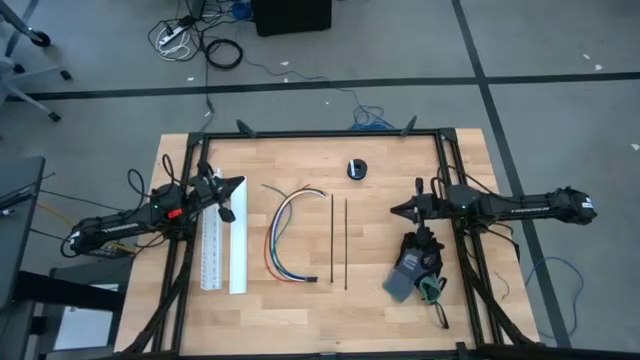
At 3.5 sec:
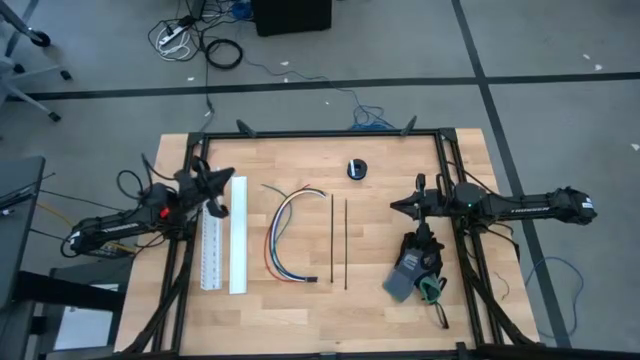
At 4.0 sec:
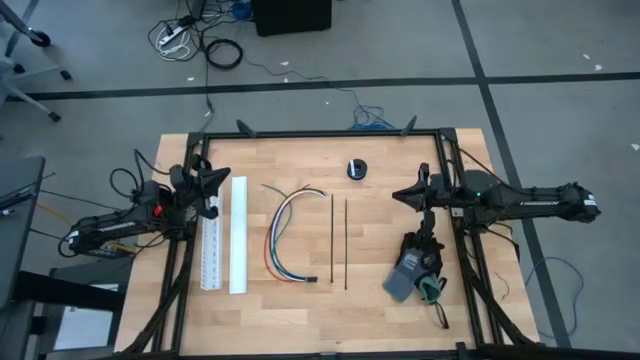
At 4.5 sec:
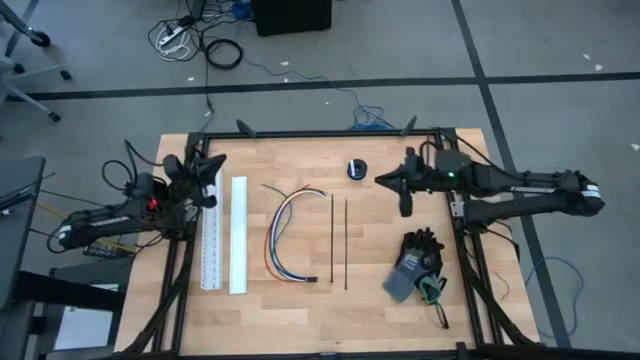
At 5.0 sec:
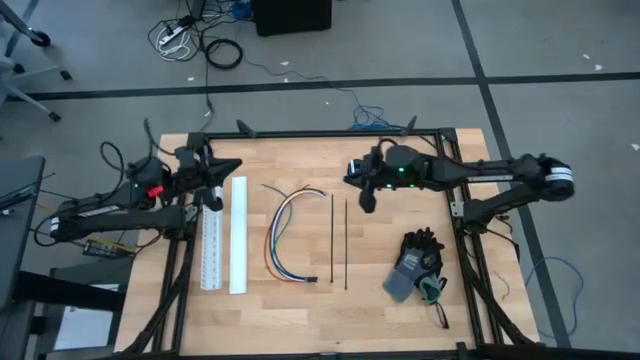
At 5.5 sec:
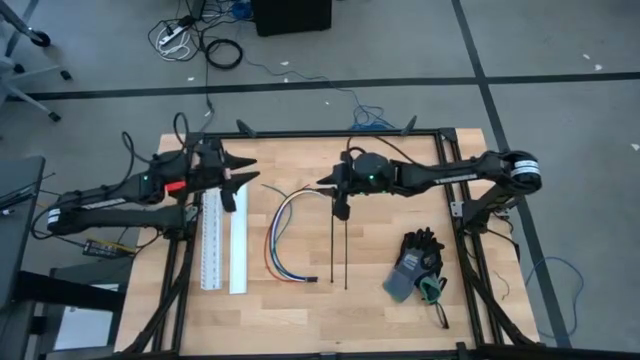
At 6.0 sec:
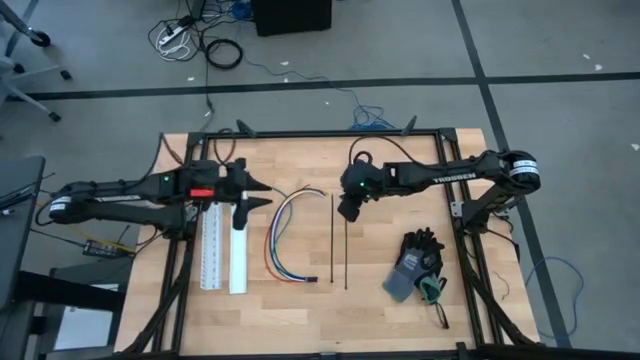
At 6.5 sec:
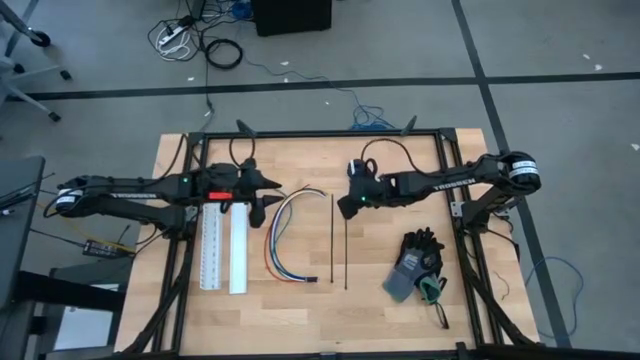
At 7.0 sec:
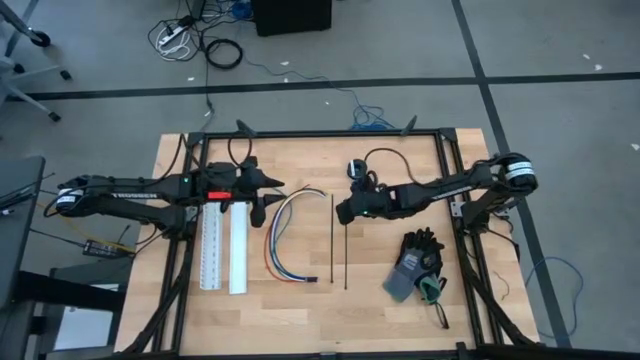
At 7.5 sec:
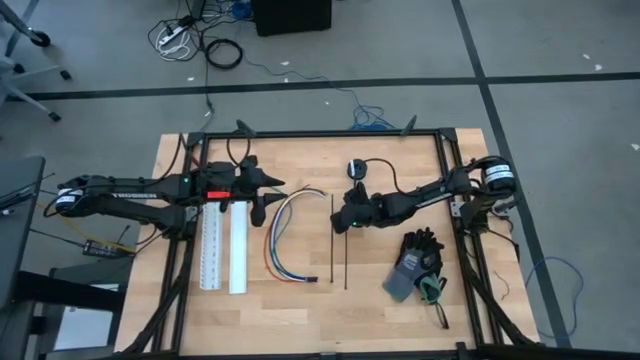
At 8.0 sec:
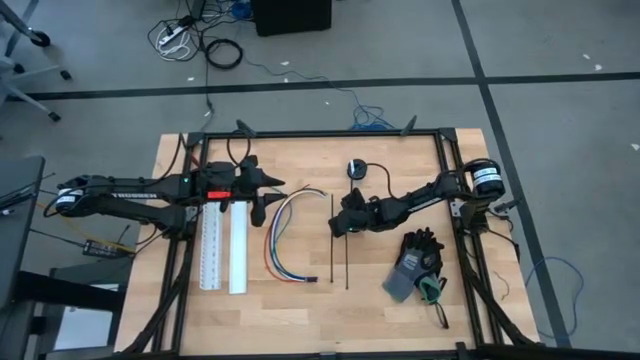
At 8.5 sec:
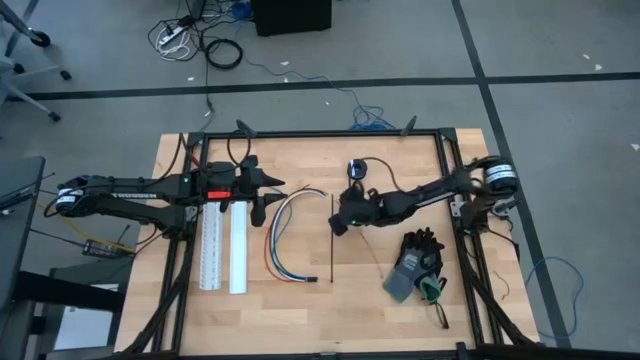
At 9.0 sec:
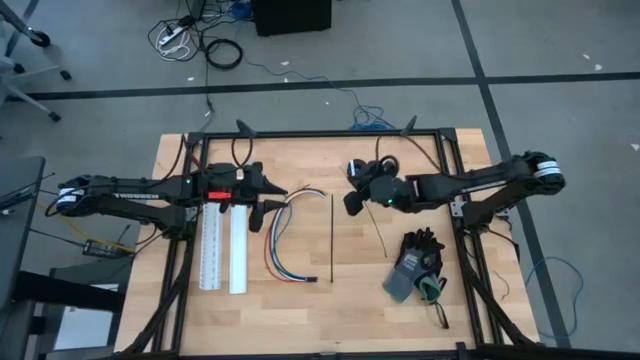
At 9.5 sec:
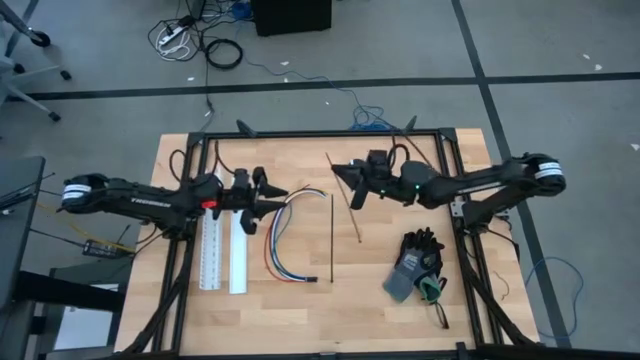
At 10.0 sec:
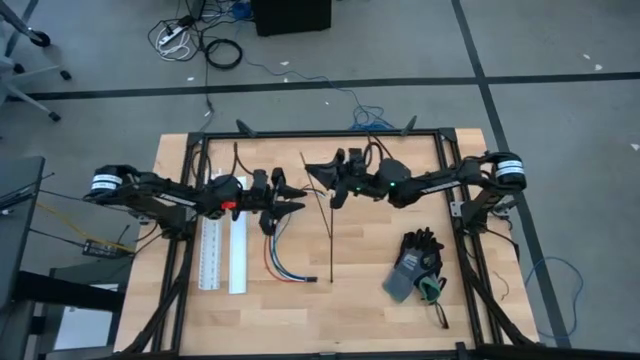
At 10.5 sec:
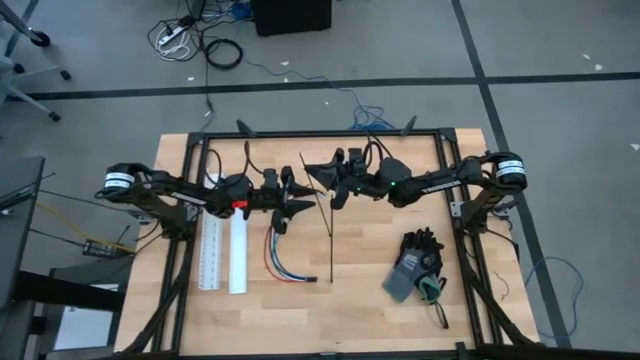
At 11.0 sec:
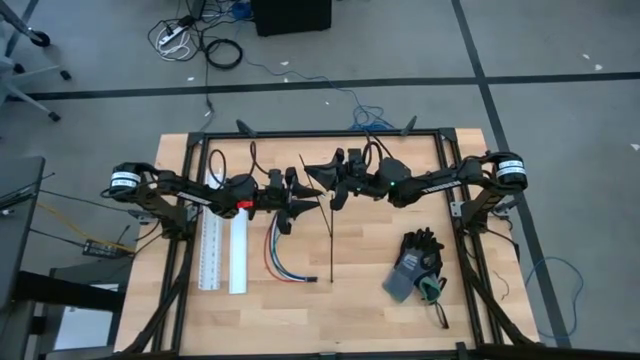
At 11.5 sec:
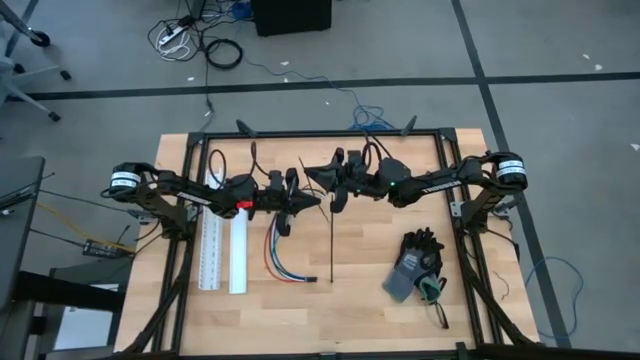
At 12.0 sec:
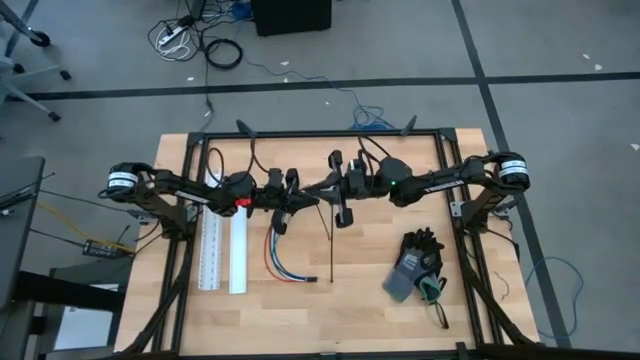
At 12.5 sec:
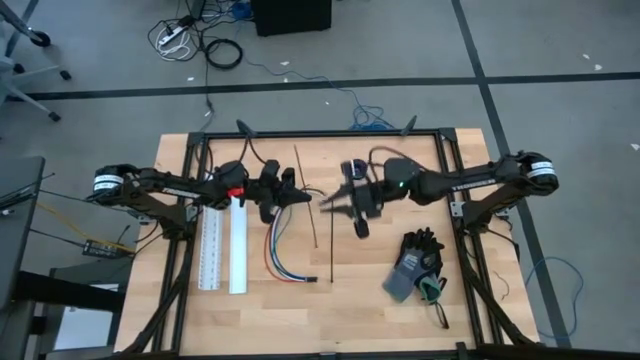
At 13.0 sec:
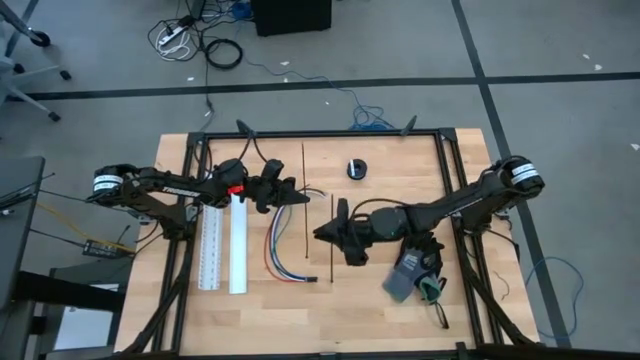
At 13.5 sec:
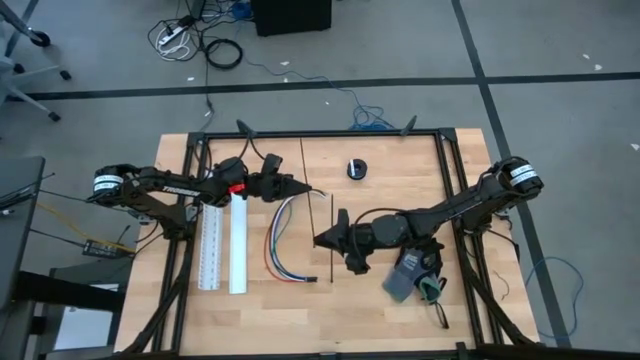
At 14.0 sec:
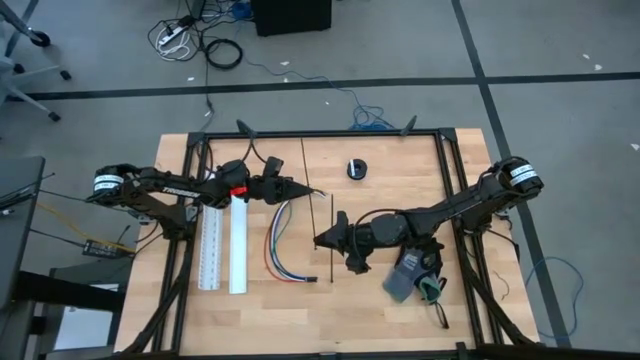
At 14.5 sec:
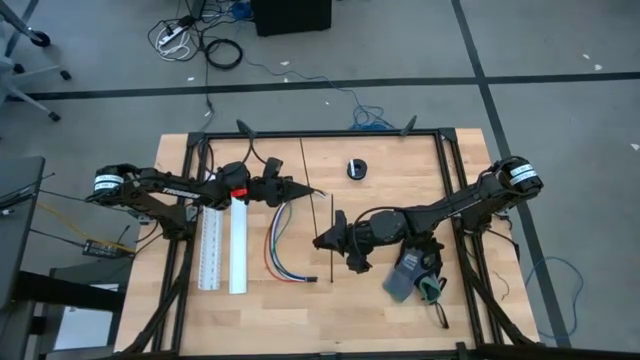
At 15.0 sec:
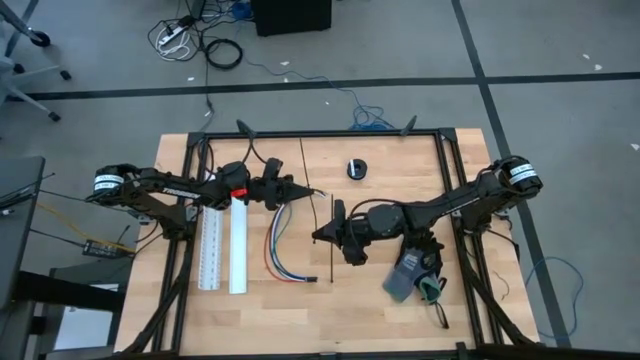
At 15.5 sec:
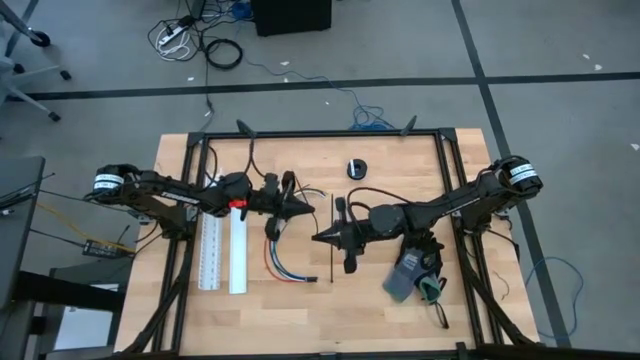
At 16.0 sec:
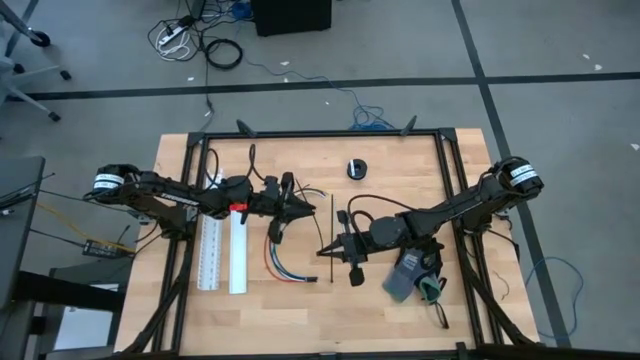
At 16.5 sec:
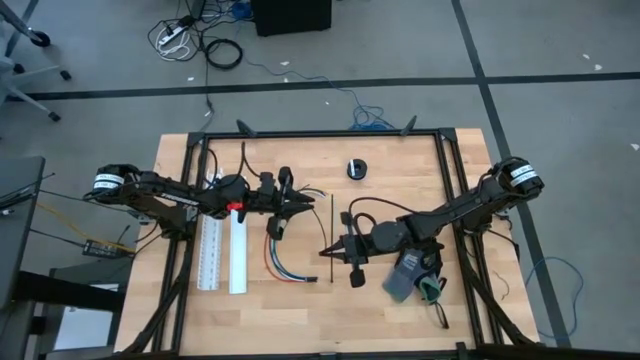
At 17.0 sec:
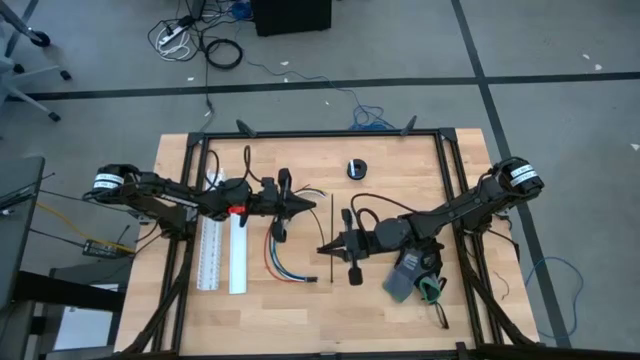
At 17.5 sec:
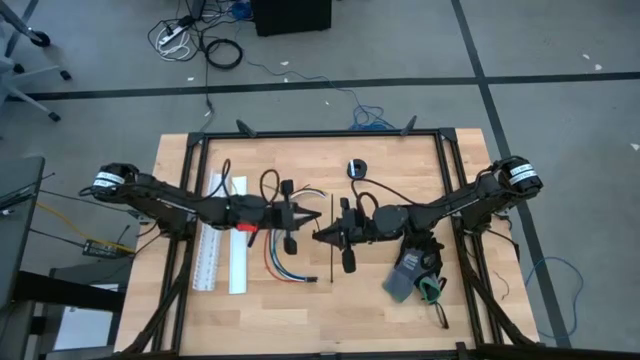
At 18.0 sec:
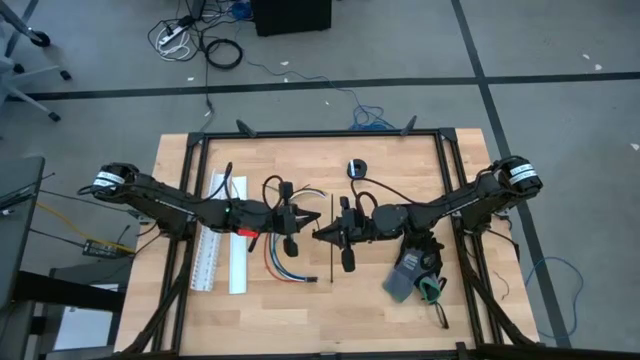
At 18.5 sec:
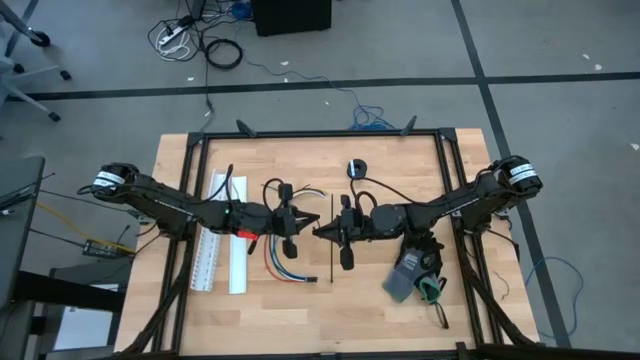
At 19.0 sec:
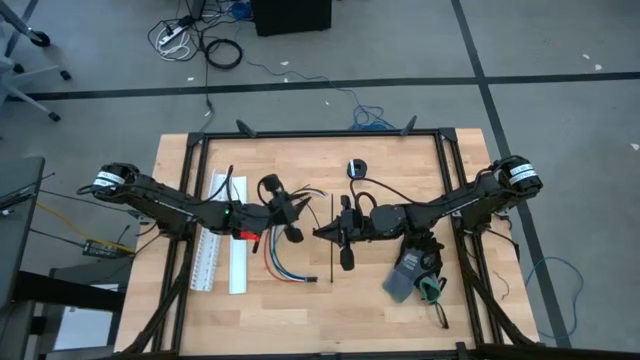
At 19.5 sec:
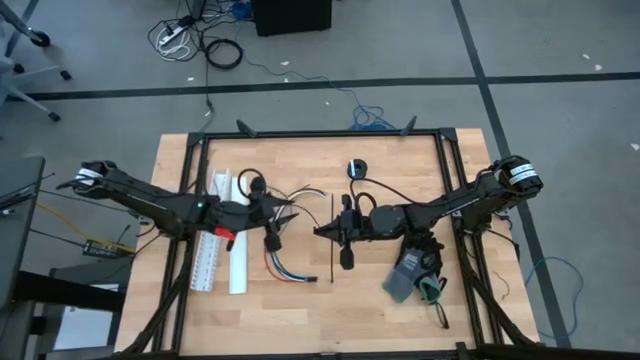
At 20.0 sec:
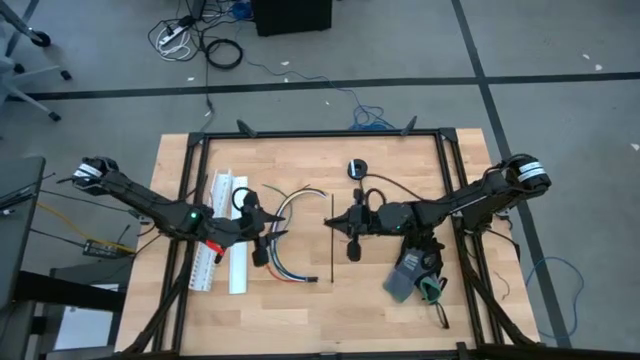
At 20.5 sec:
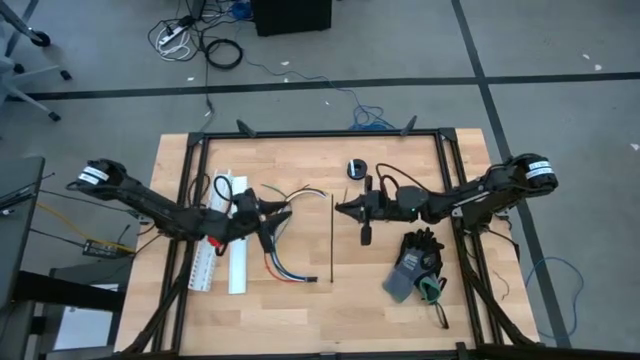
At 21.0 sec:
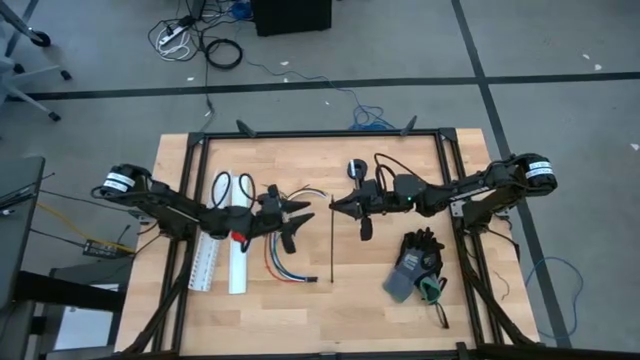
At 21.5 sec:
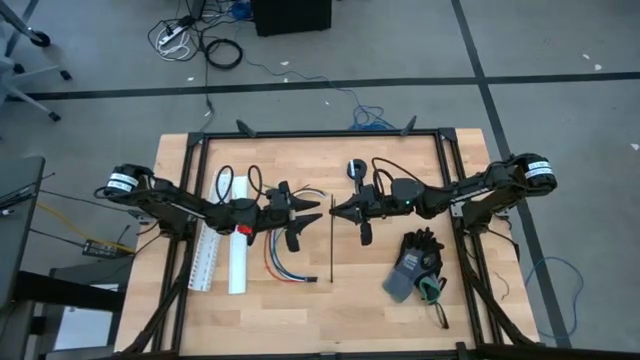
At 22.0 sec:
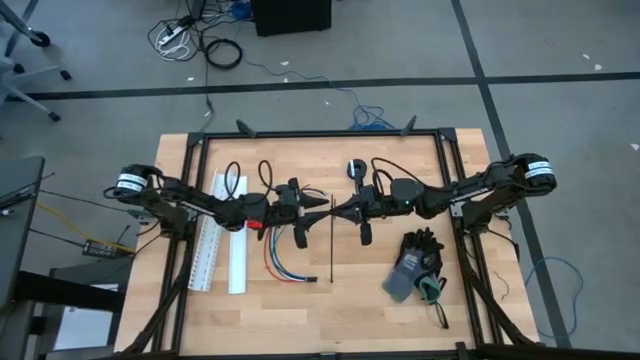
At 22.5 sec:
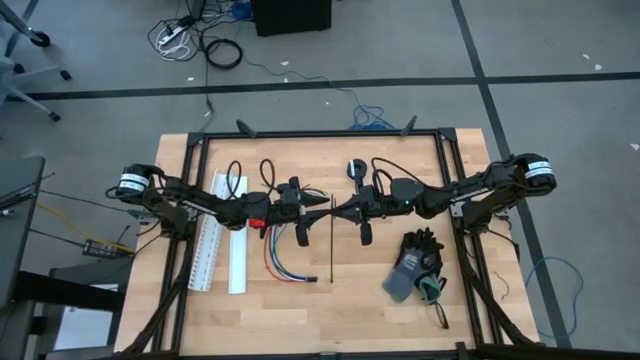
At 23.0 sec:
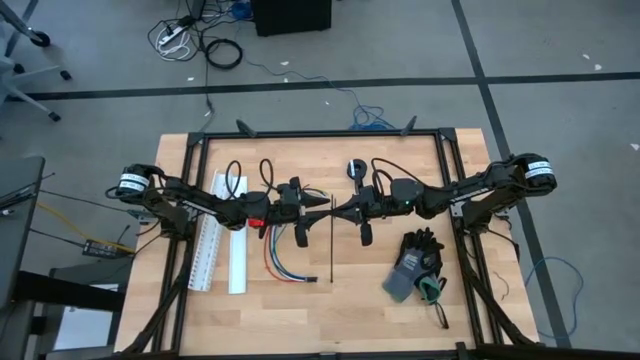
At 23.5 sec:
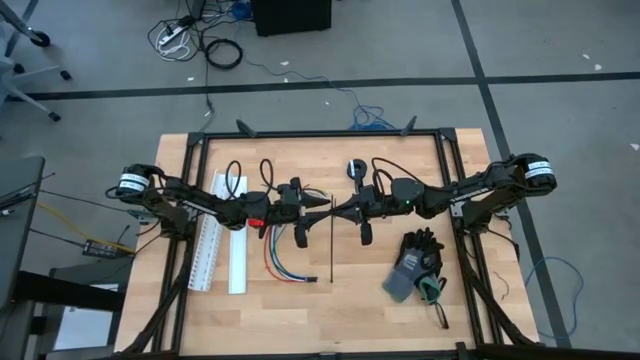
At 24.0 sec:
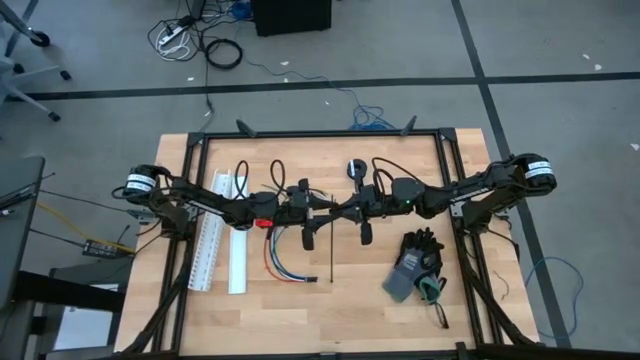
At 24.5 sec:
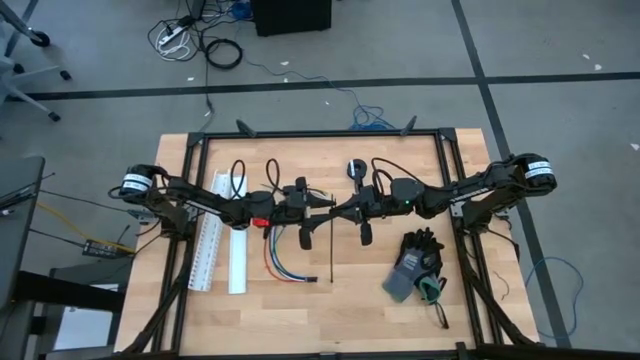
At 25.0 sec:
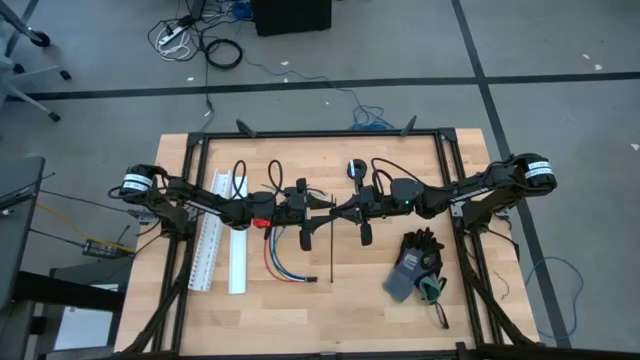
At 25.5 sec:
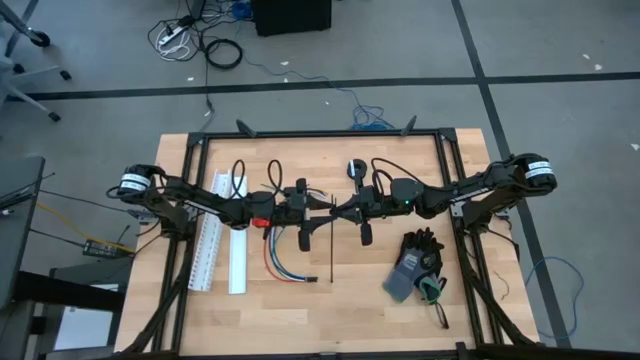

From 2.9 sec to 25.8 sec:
Task: Ziptie cables
Wrap the cables together using a ziptie
